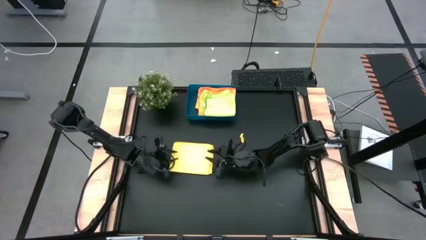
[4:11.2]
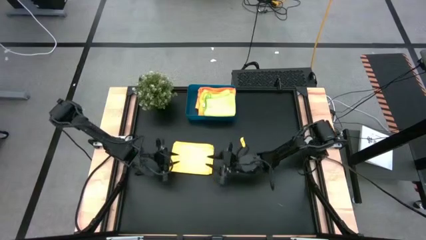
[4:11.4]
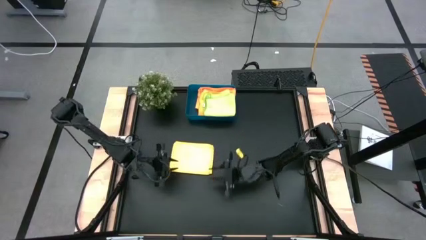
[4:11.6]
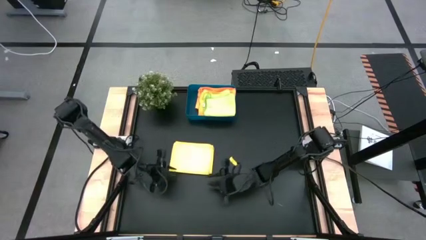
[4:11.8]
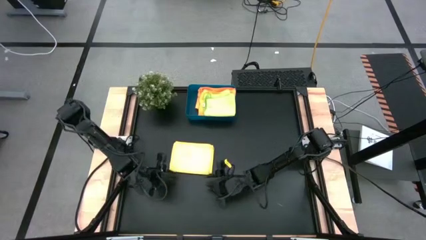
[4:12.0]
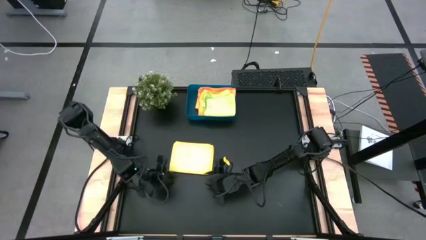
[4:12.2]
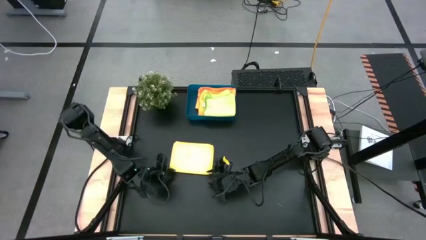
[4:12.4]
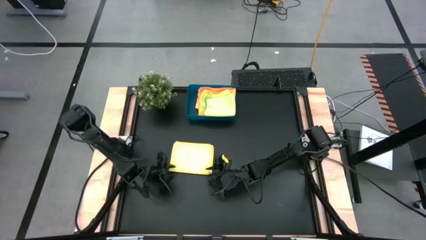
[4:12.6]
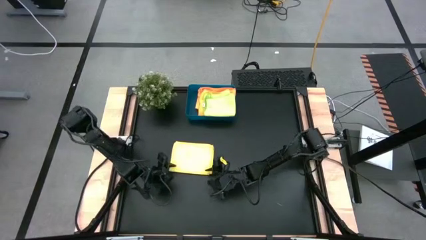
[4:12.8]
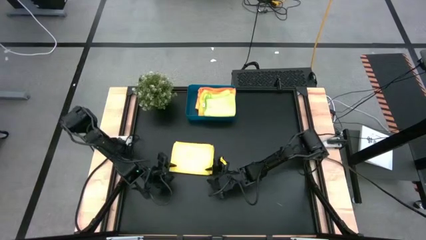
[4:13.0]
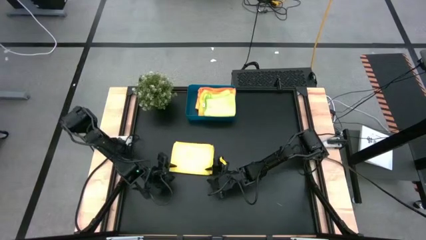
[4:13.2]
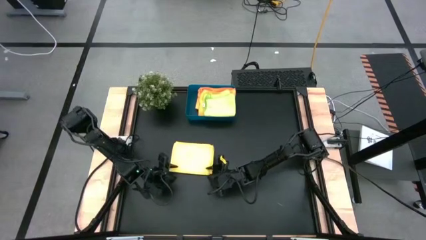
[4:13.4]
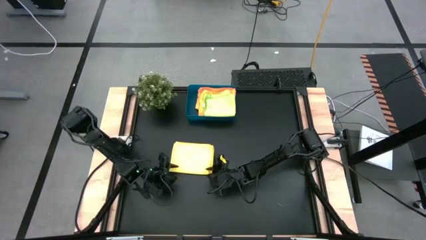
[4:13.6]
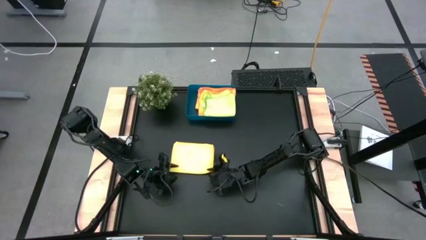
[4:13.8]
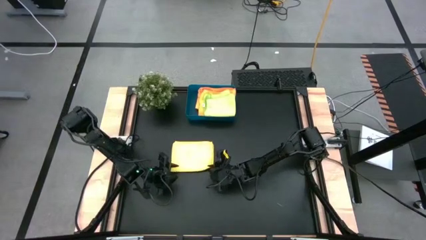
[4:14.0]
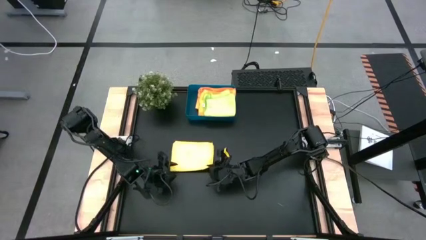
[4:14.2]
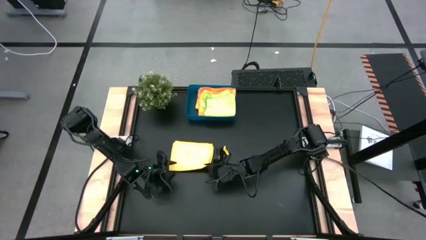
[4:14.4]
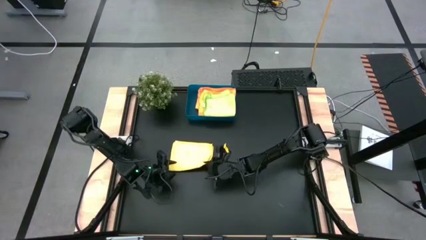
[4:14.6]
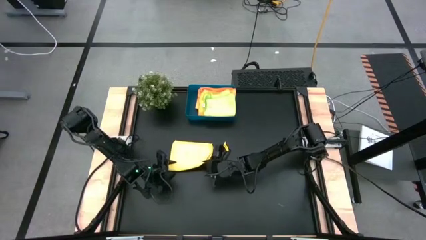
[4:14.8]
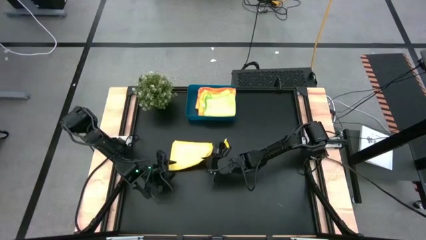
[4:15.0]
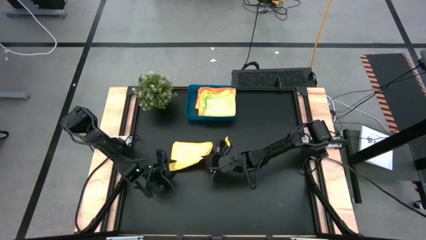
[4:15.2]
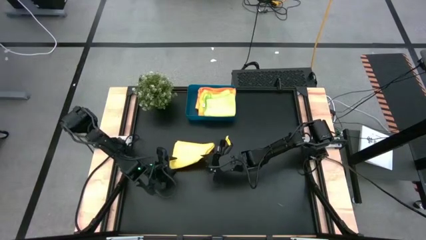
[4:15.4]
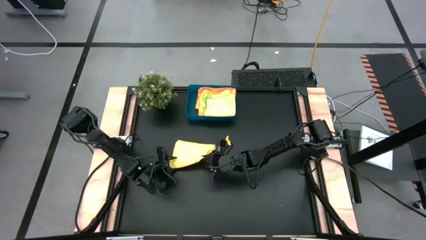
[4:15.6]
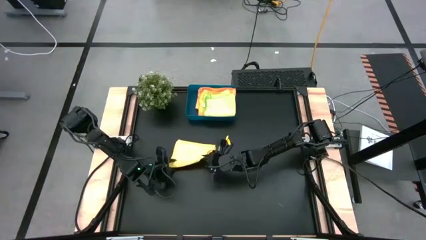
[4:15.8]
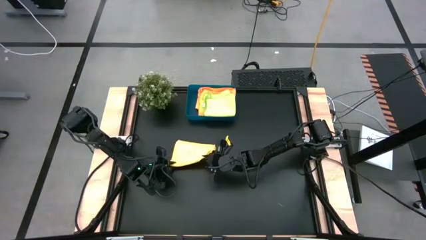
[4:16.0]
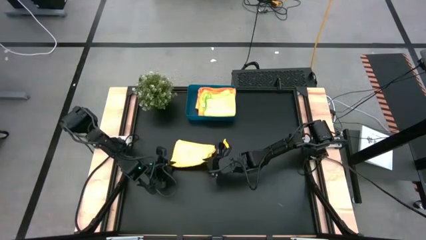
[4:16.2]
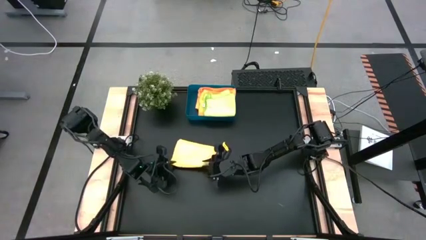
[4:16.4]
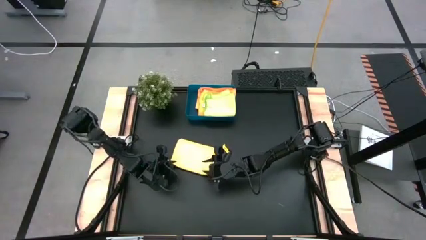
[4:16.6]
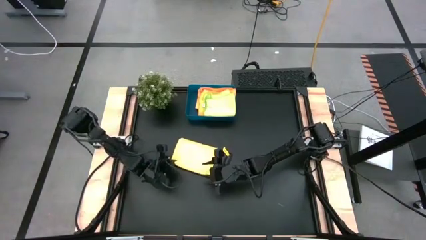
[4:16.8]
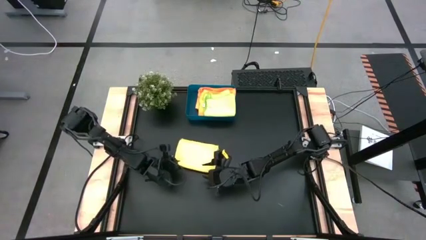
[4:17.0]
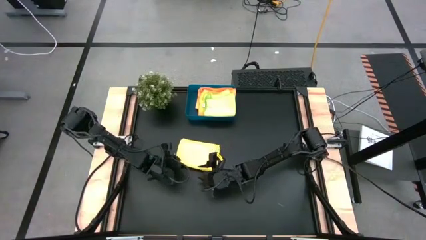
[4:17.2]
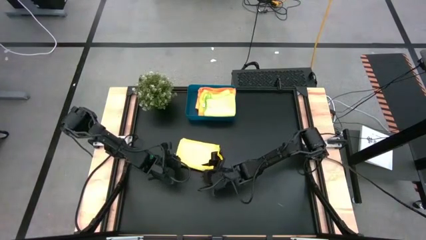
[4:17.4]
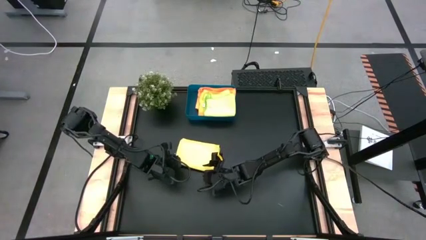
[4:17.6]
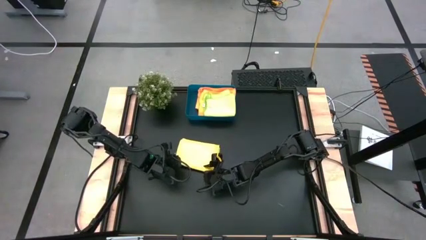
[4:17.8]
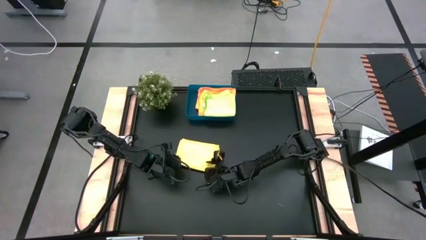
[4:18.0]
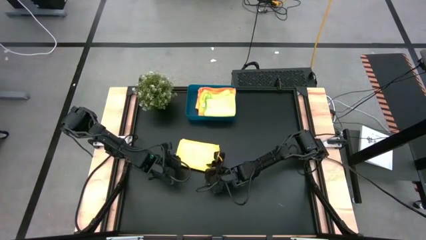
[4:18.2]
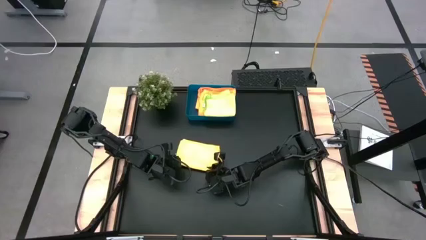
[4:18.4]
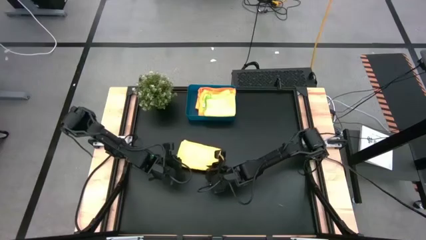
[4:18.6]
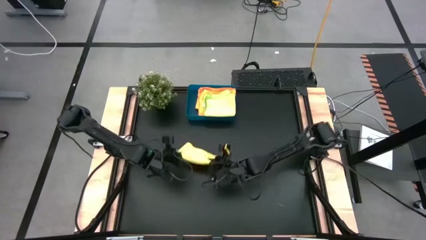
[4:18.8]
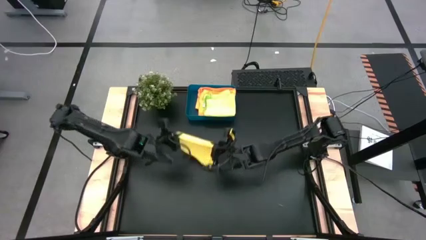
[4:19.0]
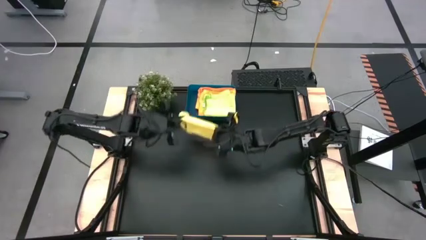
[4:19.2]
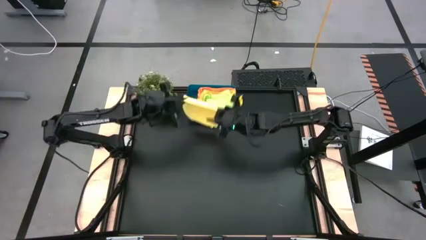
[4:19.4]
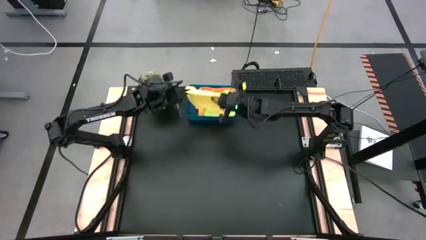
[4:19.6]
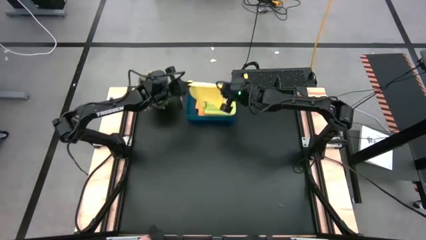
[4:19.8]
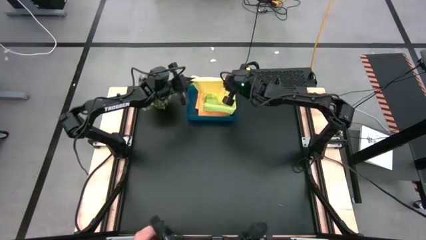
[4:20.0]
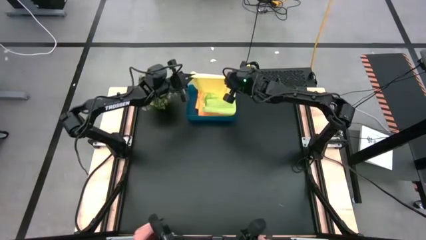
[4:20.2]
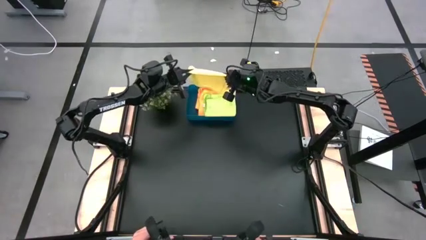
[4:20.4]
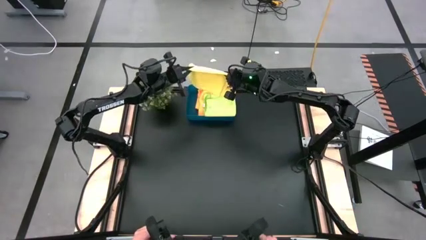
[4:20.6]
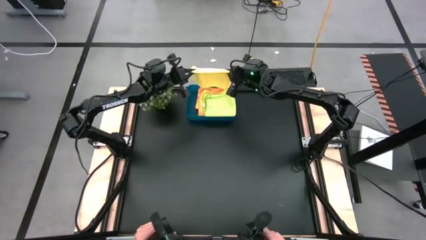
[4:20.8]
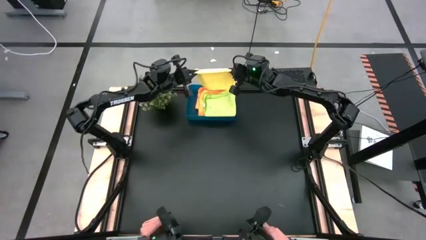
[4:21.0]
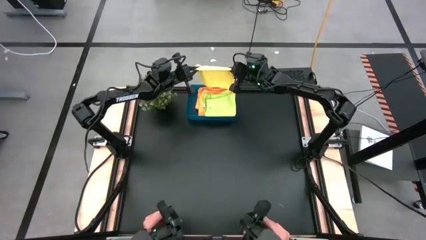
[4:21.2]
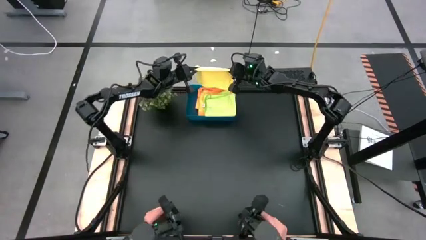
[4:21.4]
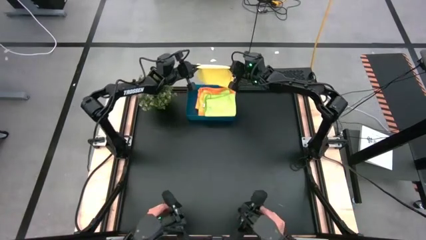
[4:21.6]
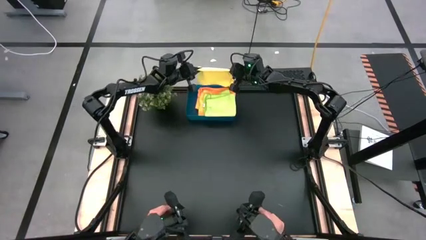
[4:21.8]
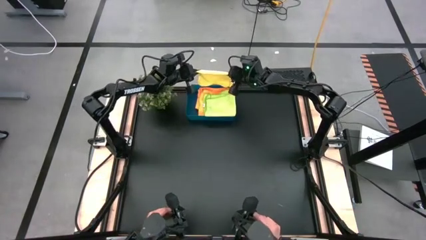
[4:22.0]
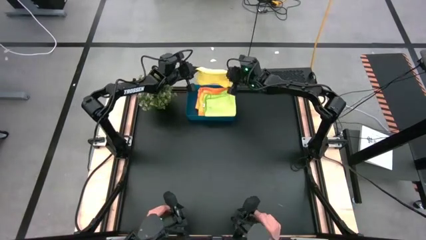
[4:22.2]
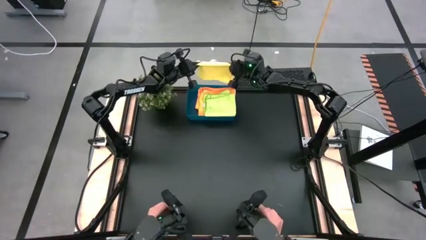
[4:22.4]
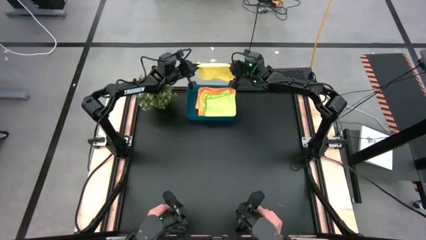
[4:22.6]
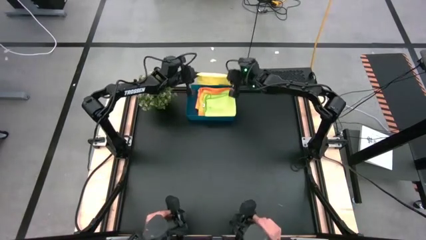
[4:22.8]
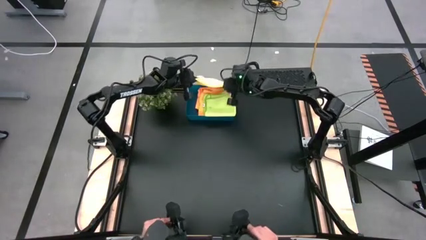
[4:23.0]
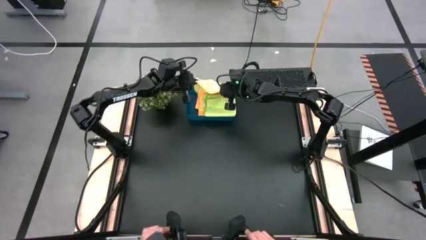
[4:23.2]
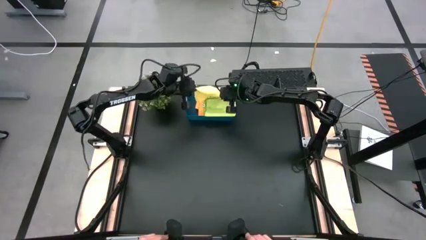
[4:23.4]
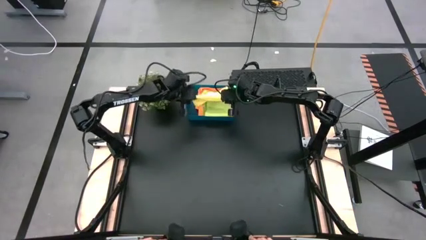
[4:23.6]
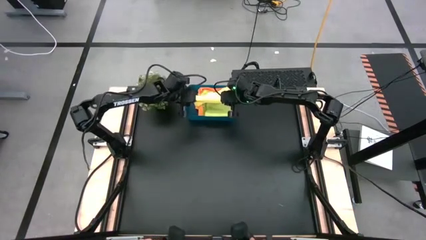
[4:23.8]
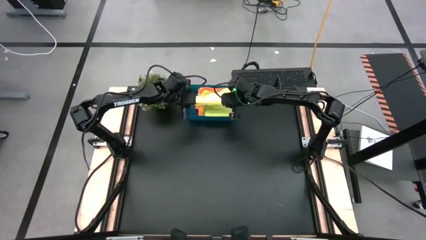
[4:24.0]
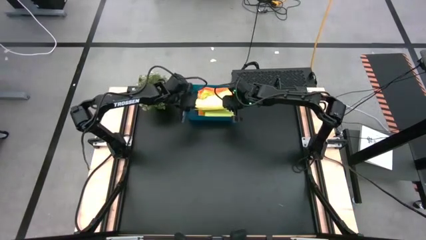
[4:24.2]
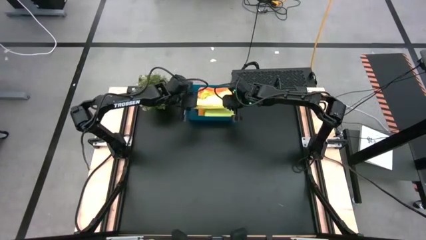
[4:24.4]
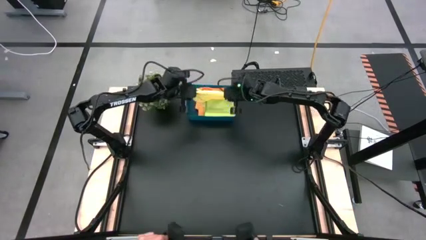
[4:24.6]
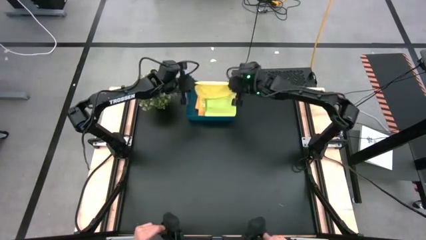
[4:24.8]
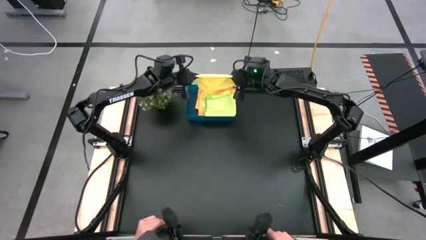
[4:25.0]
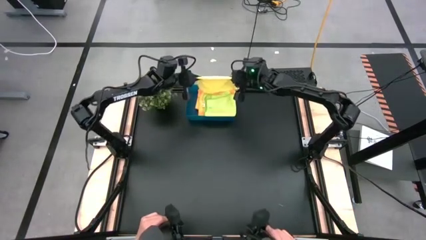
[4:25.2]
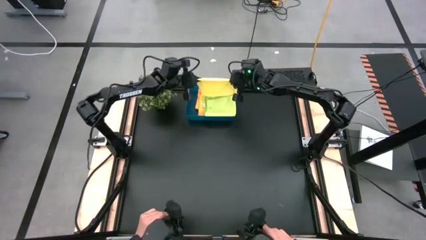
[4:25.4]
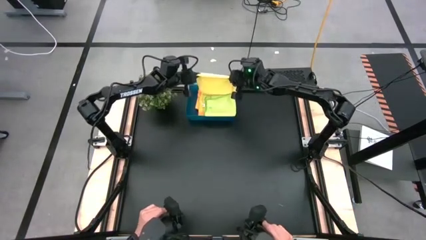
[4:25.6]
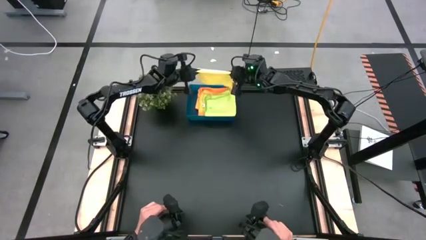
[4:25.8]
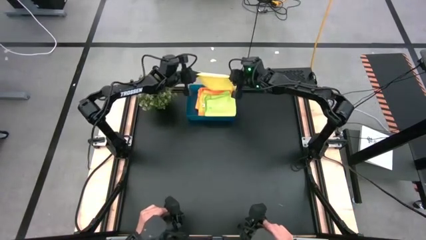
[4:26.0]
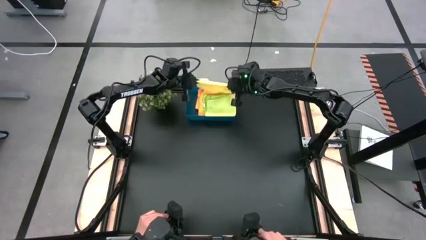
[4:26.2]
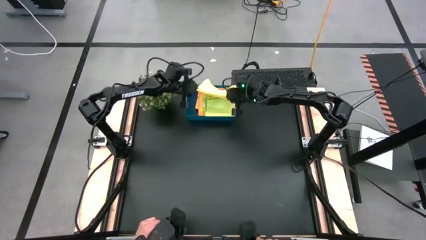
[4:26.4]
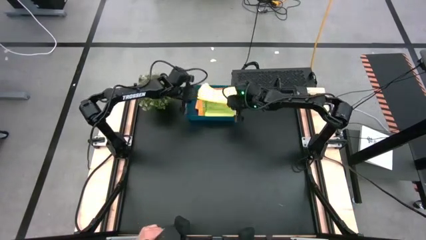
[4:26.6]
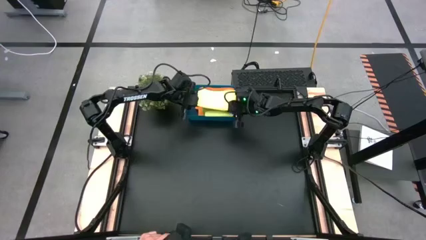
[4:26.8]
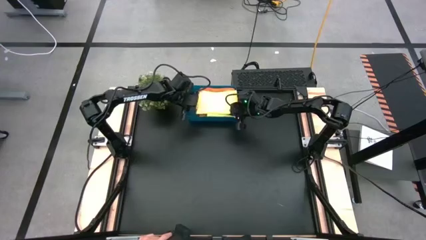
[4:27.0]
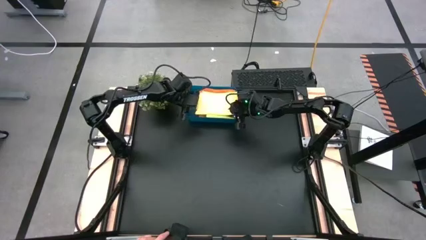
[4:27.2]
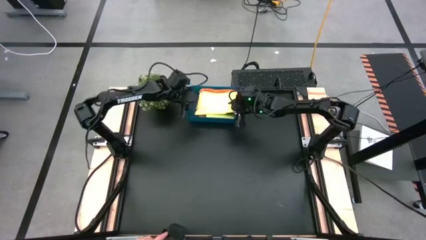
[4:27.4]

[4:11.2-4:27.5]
Task: Fold microfiber towels
Put the yellow microfiber towel into the blue bin

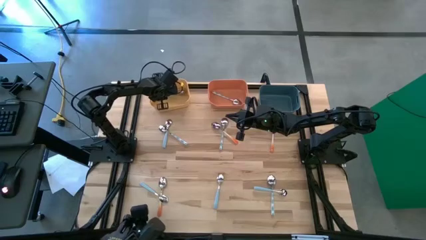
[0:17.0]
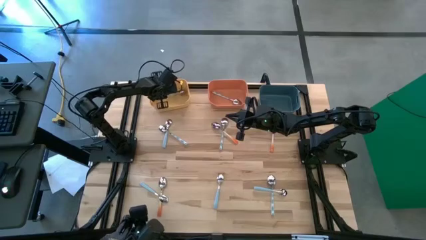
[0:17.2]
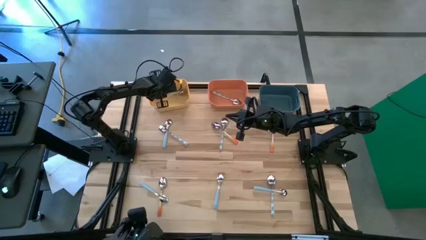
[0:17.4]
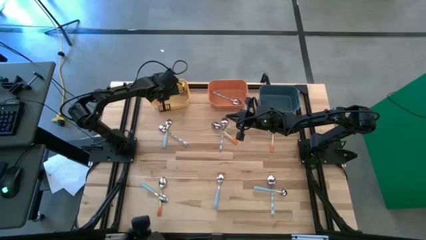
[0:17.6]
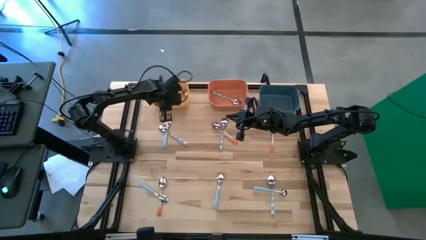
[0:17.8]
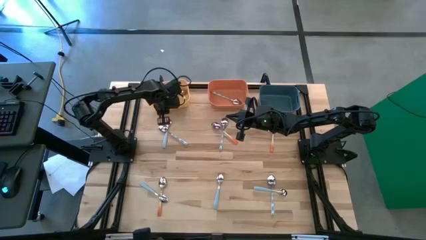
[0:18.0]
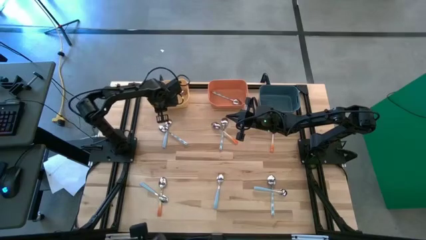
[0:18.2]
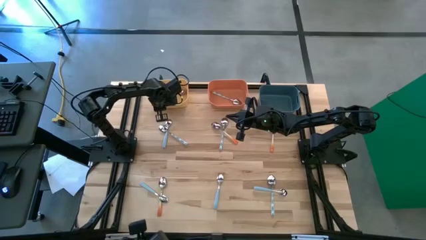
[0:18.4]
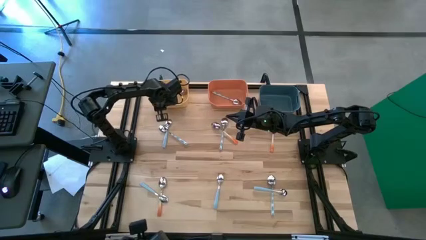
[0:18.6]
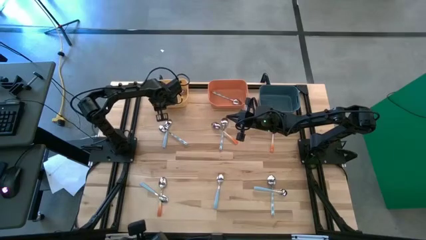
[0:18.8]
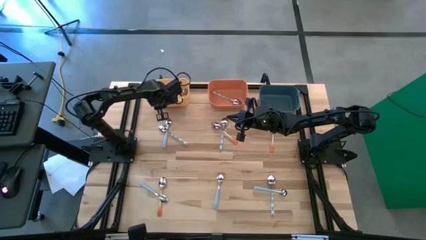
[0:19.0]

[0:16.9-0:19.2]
Task: Sort silverware by color (type)
Adjust the yellow bin
